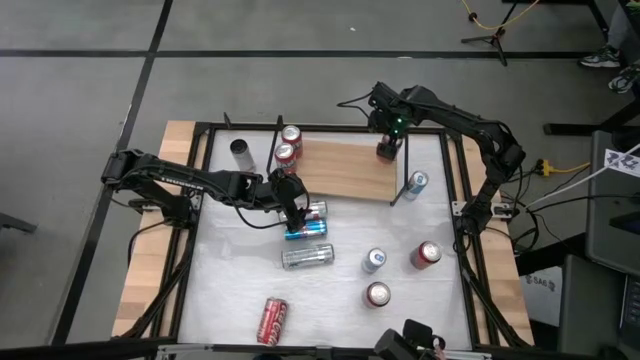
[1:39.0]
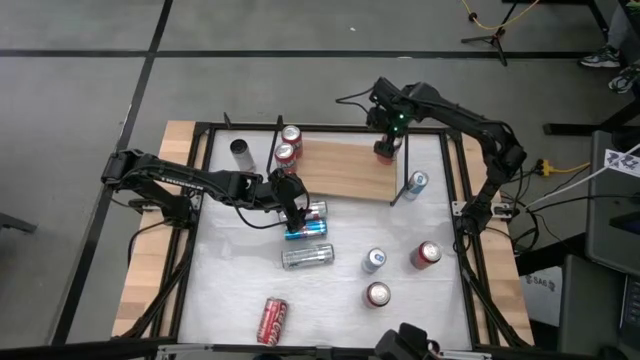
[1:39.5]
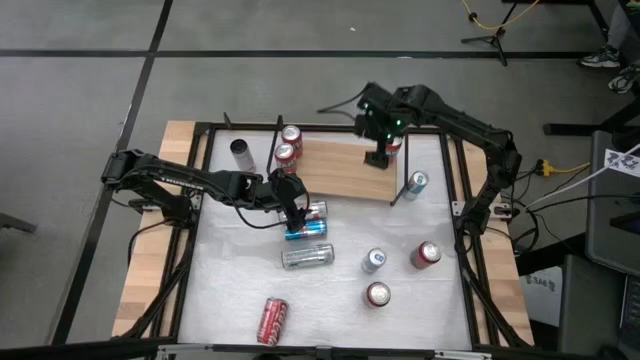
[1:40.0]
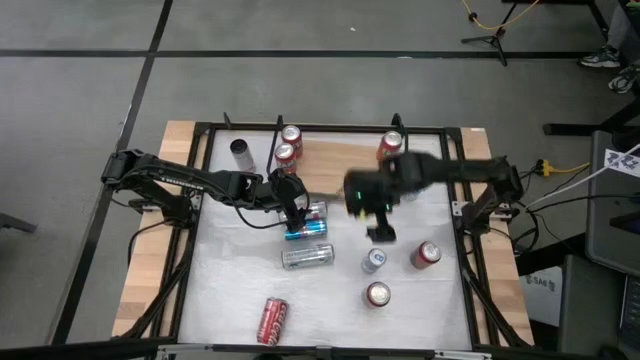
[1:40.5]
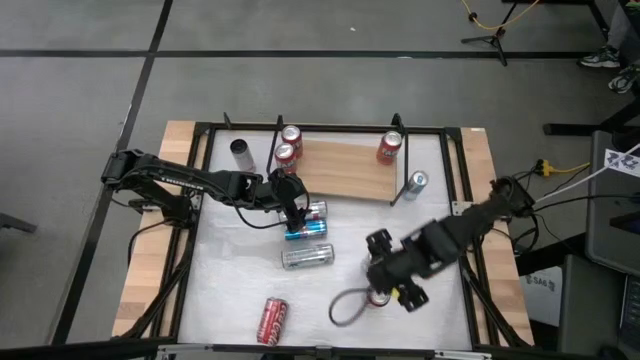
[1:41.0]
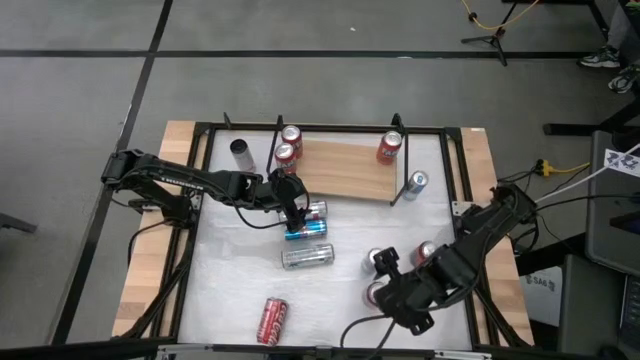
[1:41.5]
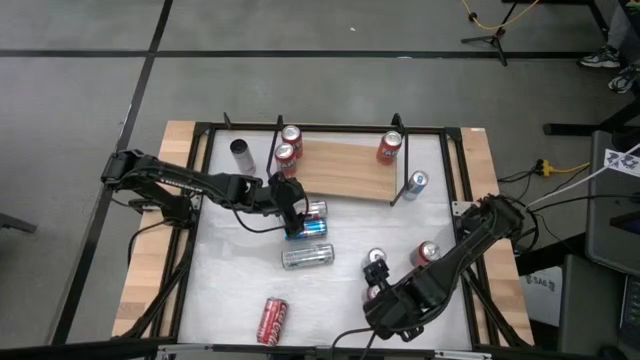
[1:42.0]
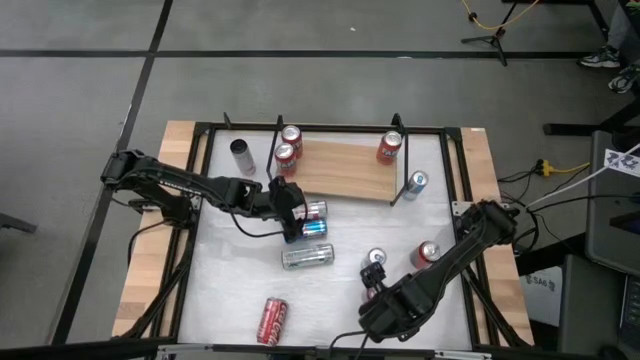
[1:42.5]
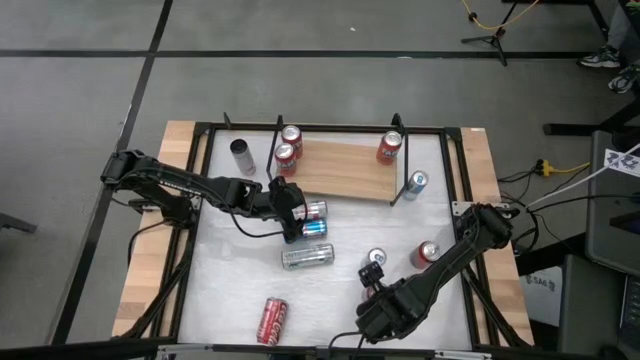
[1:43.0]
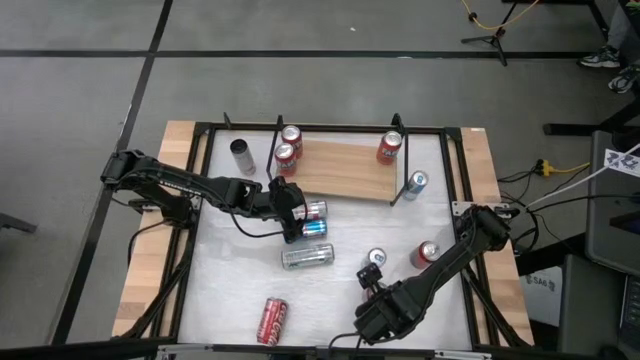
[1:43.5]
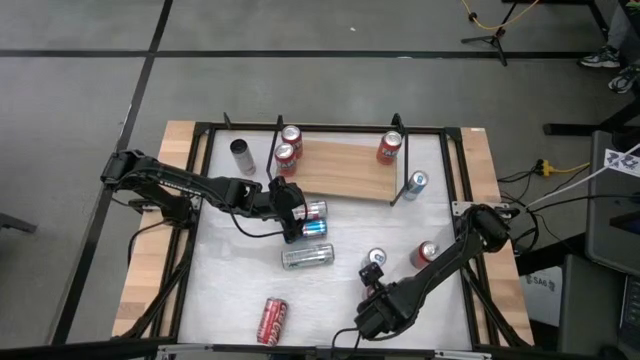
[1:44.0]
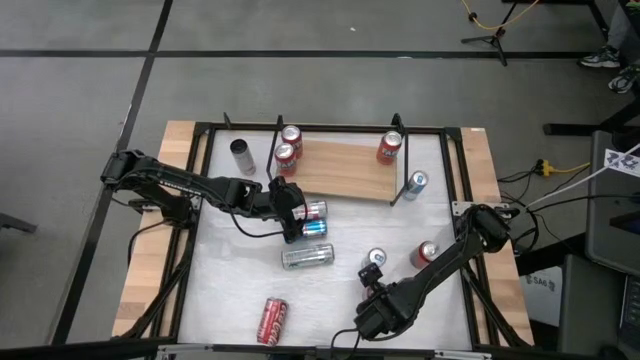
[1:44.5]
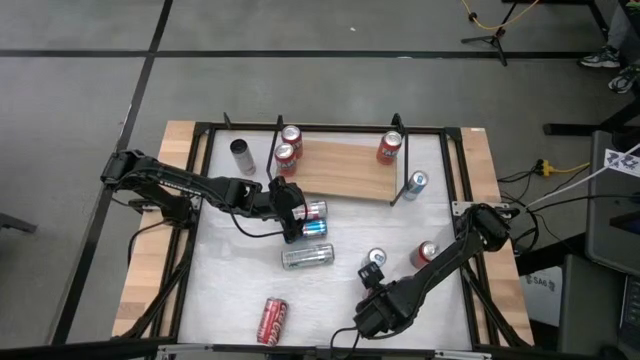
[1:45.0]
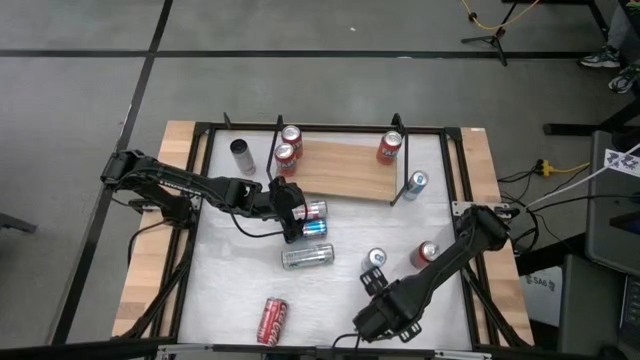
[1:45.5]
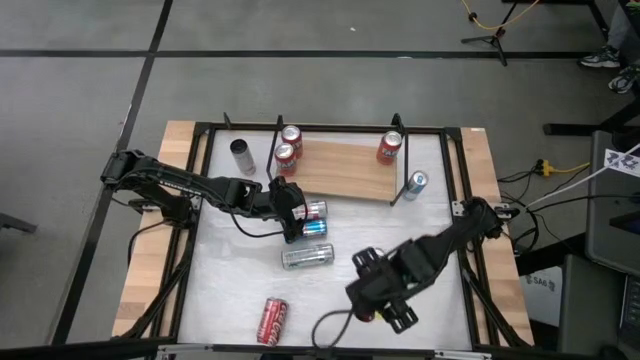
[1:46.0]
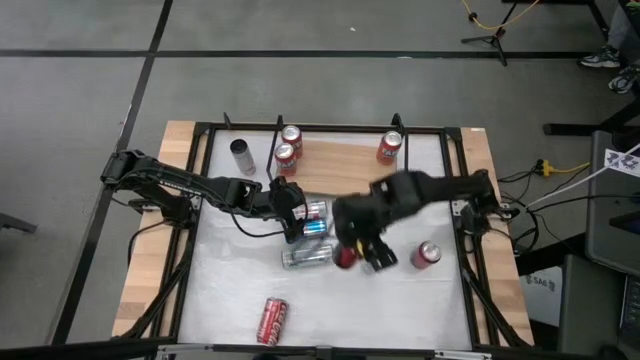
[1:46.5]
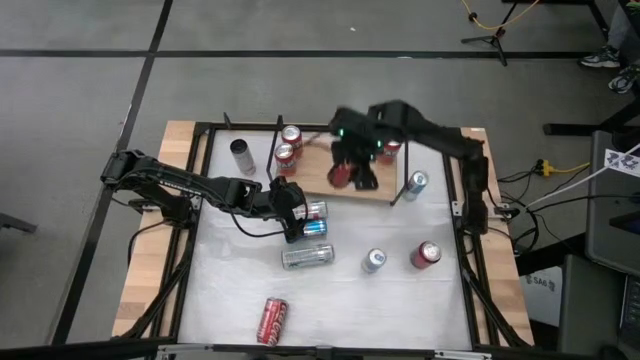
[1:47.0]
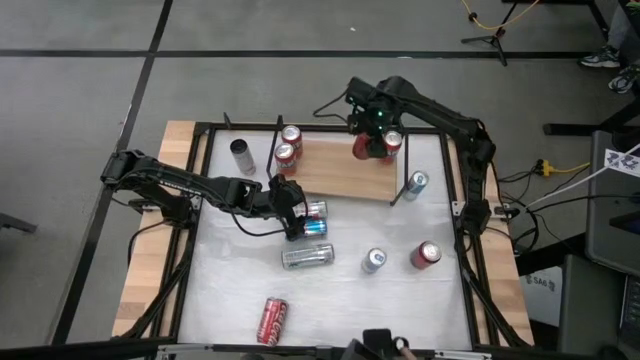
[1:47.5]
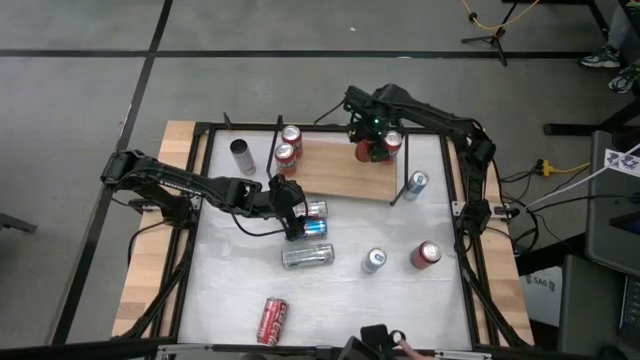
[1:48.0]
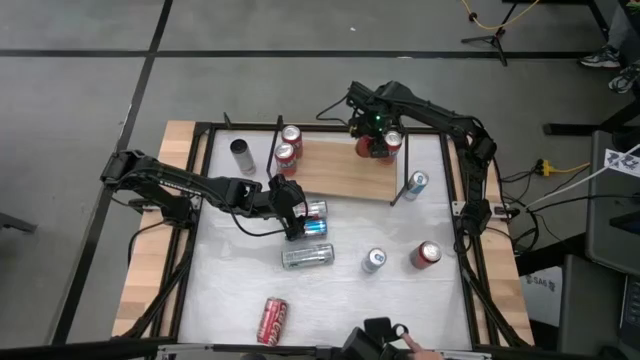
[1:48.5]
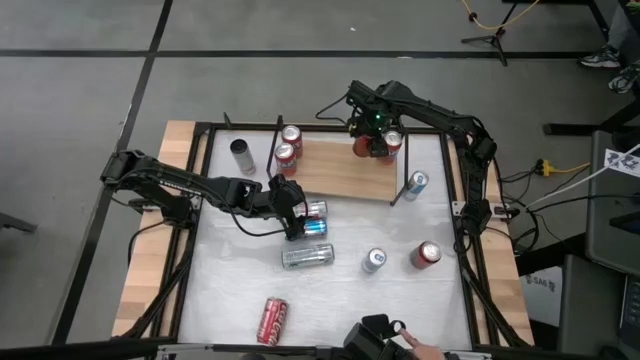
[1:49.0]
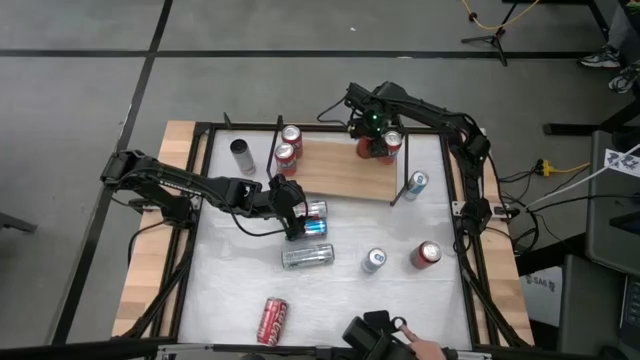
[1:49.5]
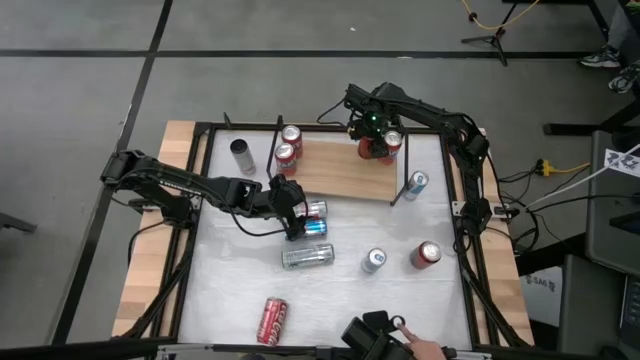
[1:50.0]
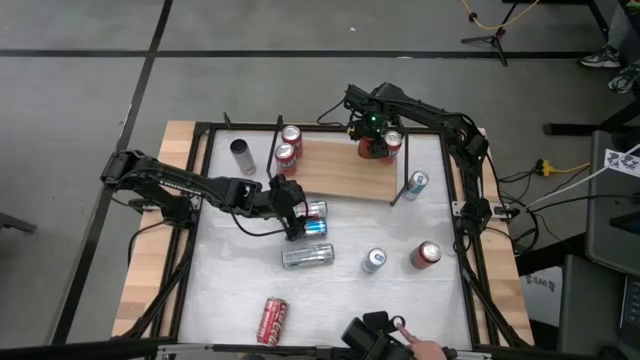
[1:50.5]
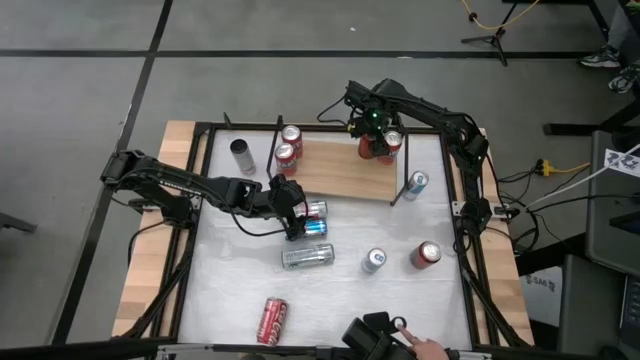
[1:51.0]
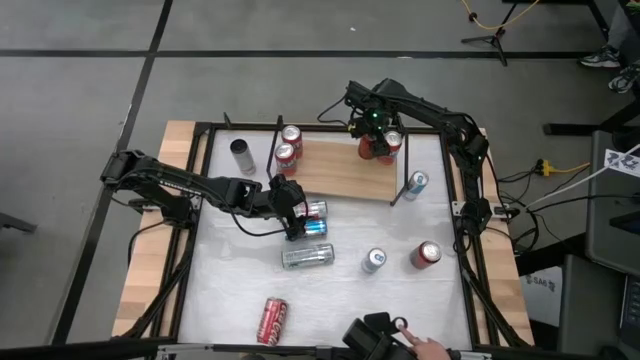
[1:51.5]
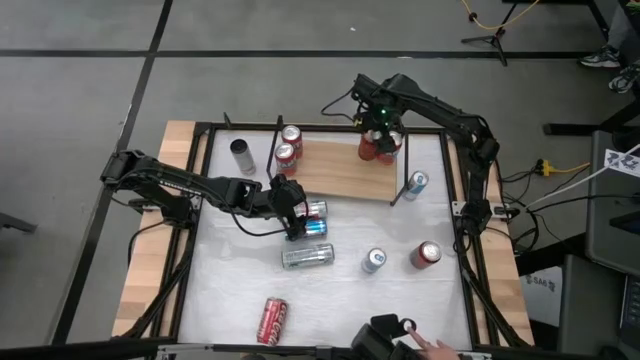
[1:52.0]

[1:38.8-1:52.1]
Task: Place canned beverage on shelf
Put the middle red-black soda can on the shelf

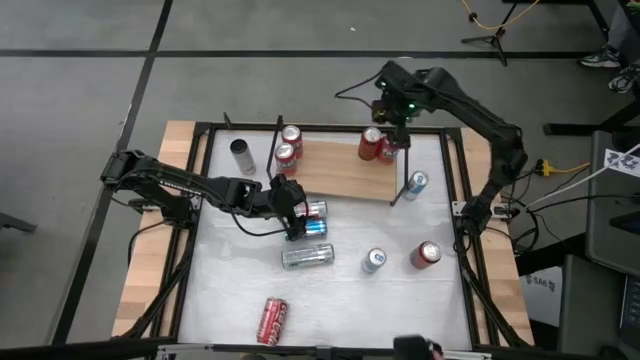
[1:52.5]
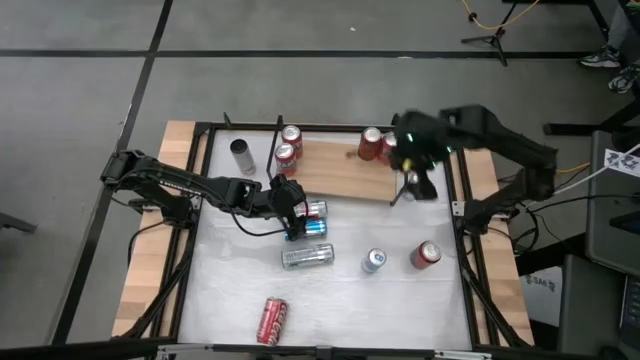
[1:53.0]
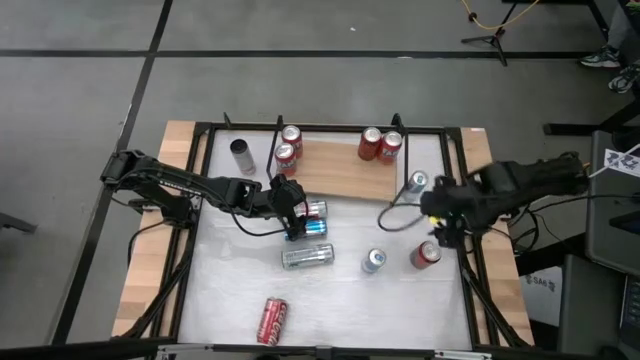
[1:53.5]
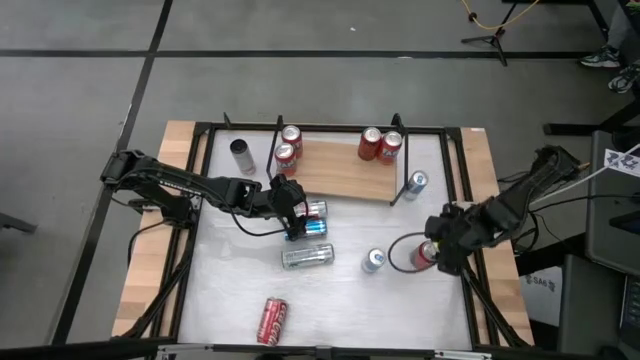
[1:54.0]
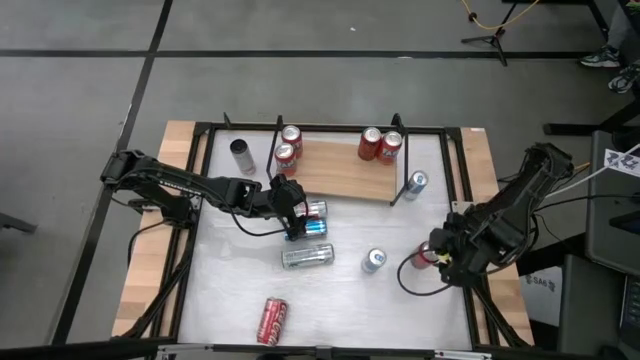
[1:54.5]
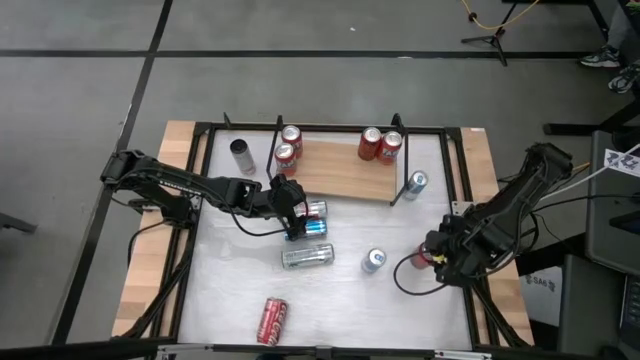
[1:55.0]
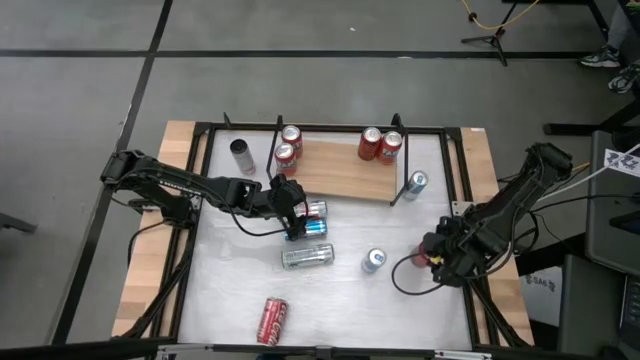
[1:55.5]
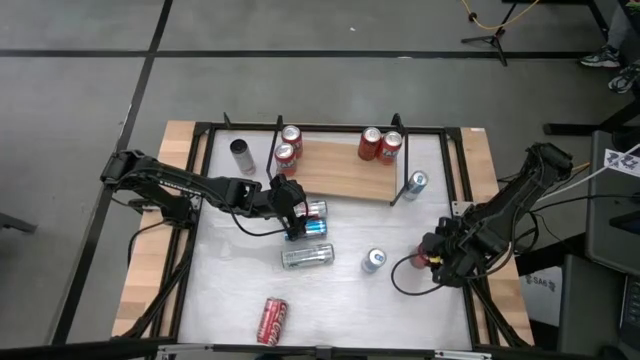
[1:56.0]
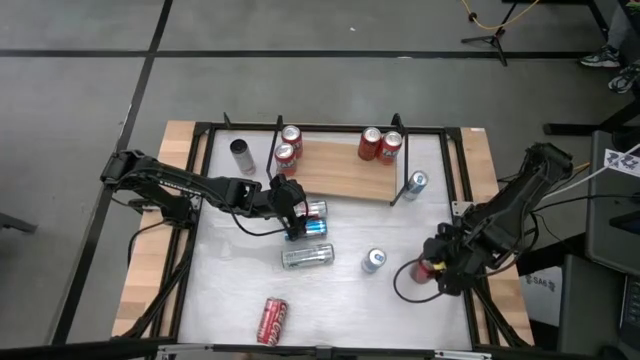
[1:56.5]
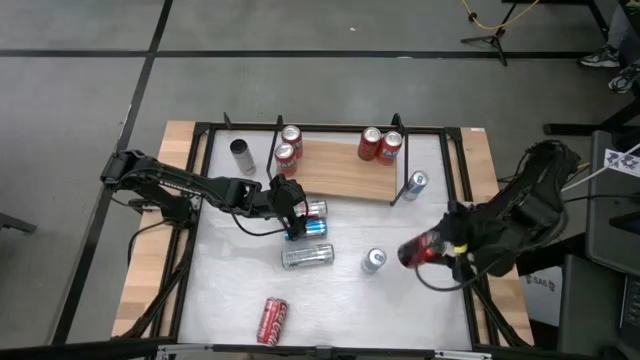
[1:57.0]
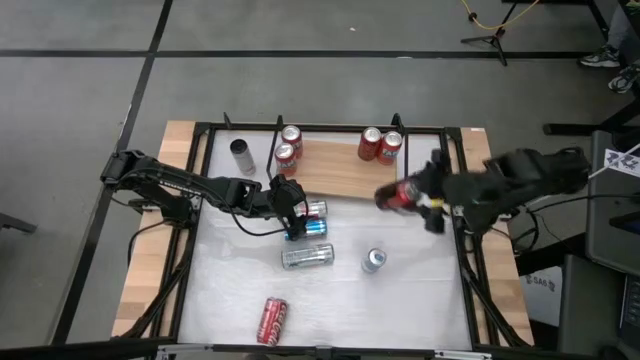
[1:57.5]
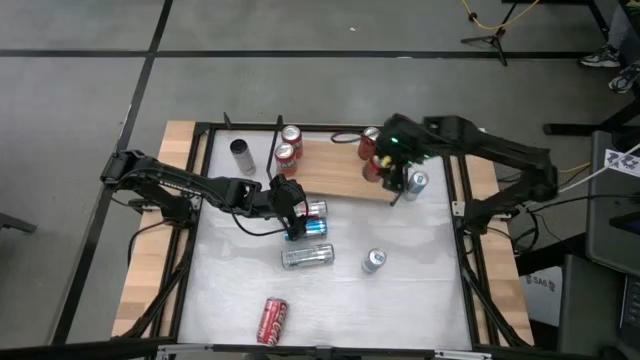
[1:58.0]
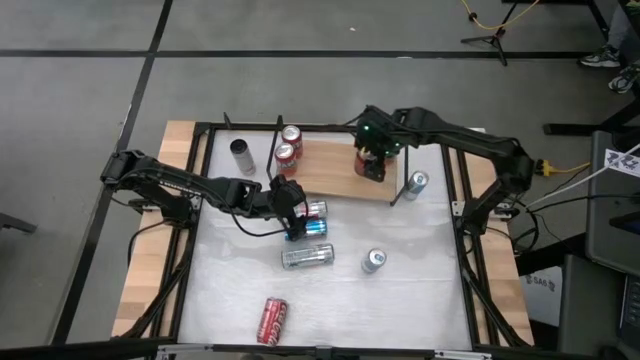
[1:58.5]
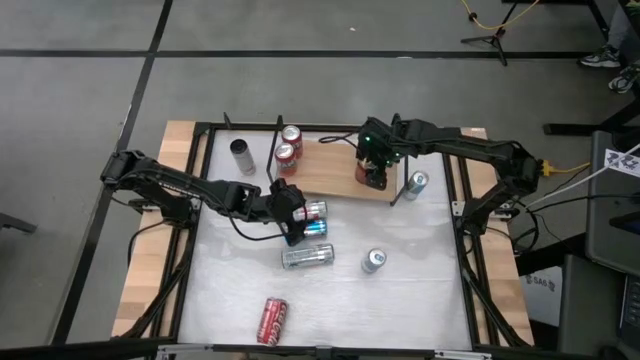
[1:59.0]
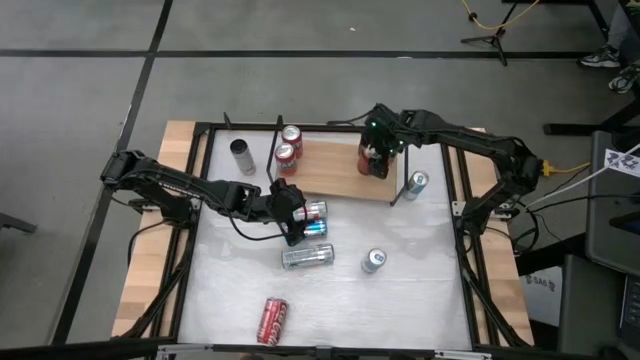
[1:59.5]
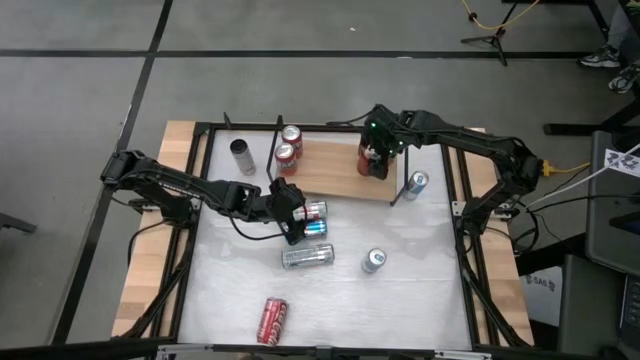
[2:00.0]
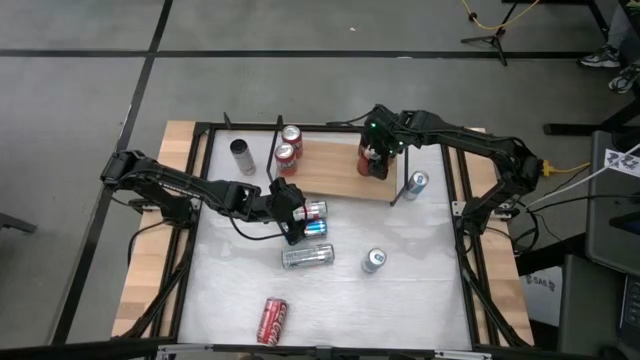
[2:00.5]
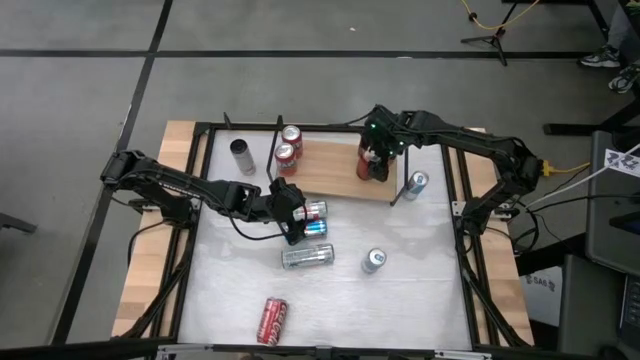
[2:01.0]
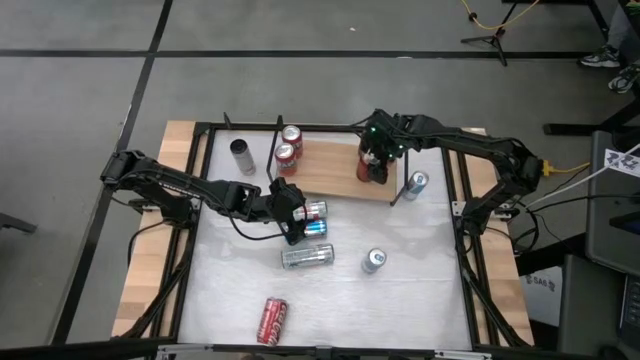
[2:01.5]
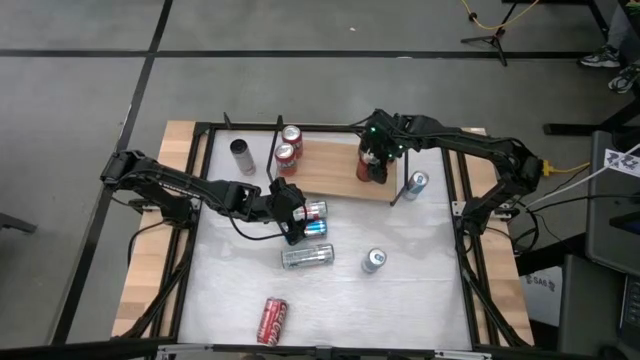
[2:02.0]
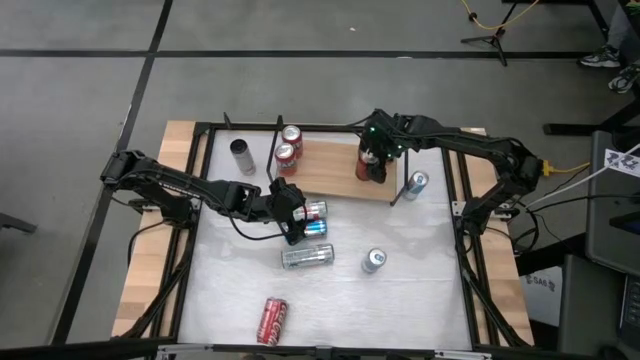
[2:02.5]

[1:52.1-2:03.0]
Put the top red-black soda can on the shelf aligned with the red-black soda can
